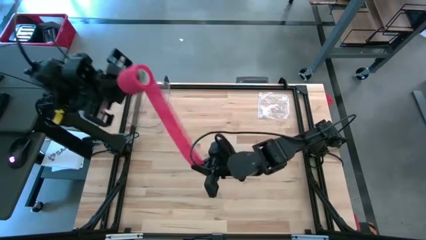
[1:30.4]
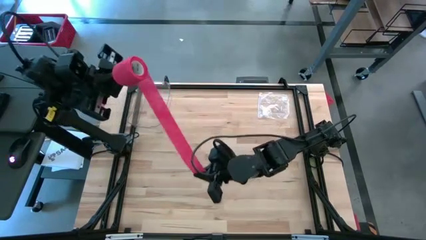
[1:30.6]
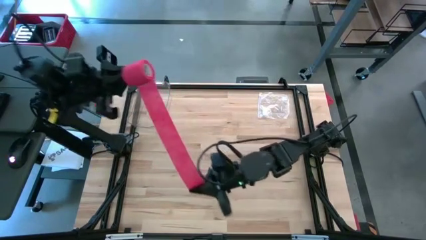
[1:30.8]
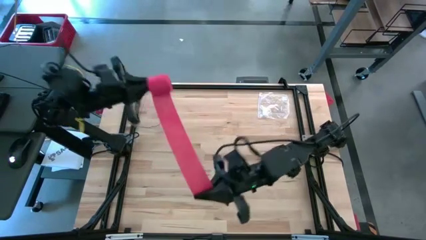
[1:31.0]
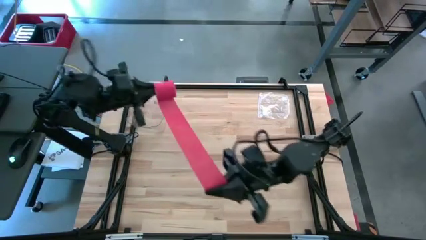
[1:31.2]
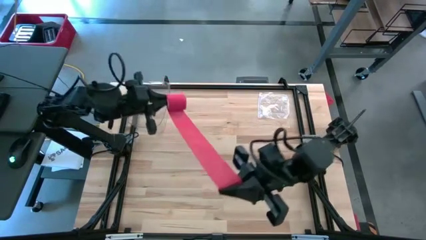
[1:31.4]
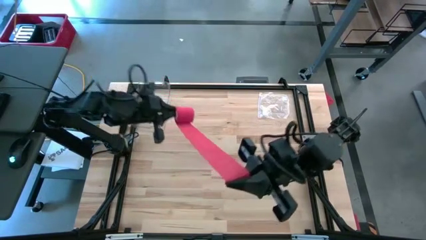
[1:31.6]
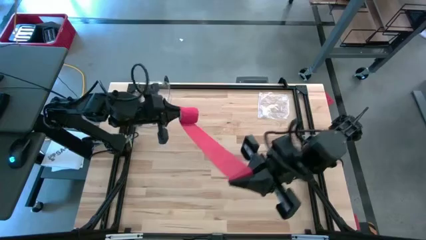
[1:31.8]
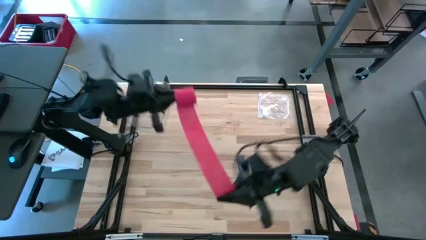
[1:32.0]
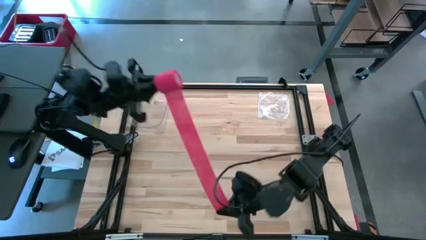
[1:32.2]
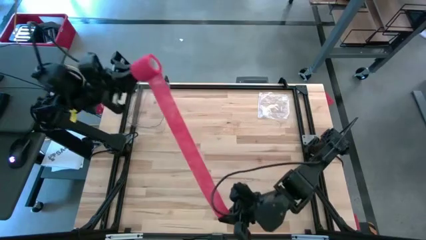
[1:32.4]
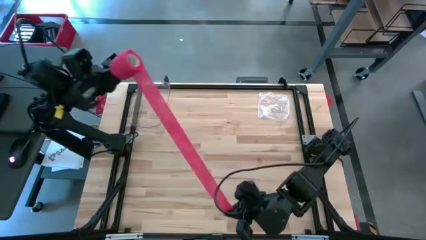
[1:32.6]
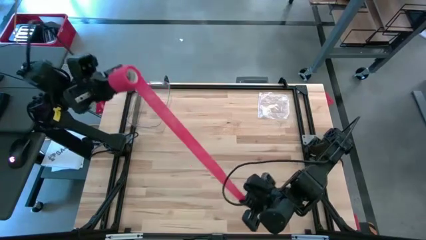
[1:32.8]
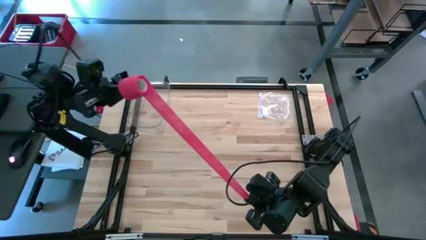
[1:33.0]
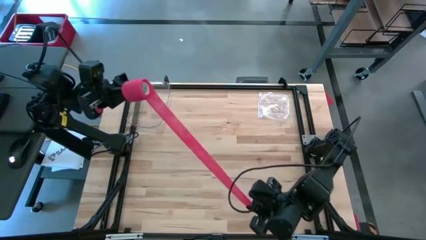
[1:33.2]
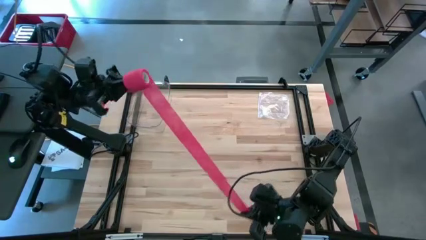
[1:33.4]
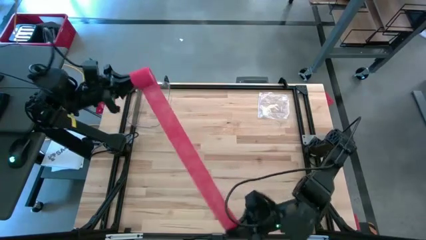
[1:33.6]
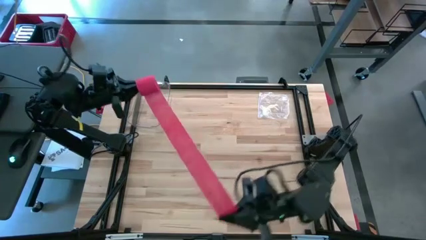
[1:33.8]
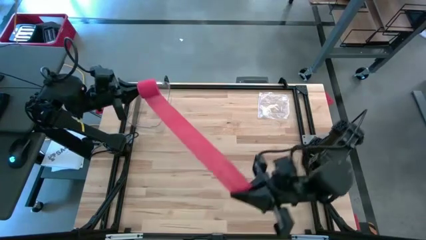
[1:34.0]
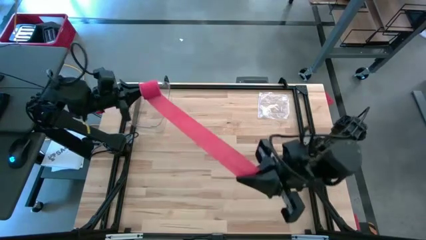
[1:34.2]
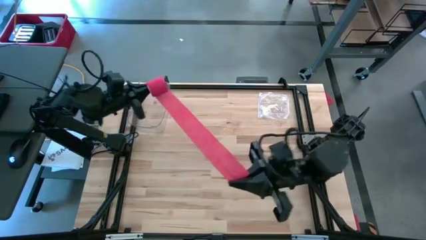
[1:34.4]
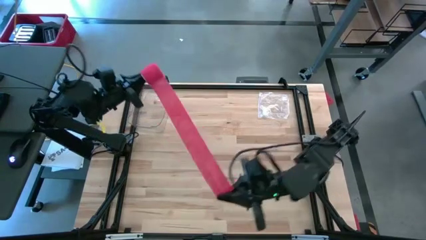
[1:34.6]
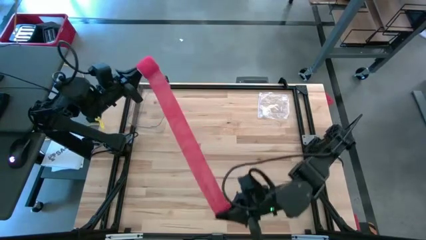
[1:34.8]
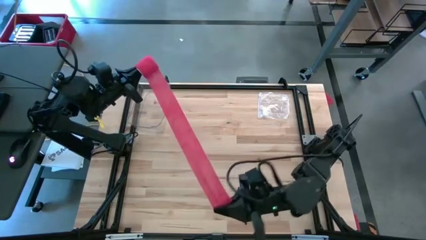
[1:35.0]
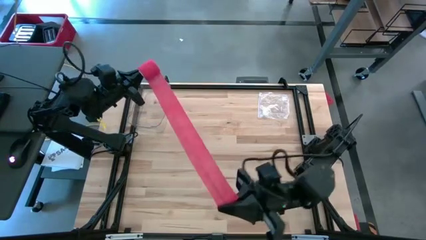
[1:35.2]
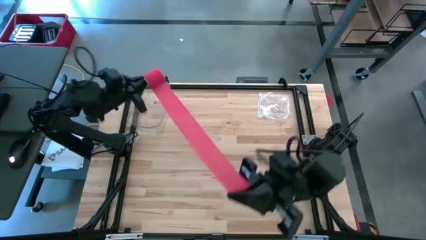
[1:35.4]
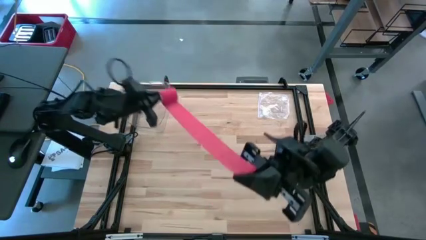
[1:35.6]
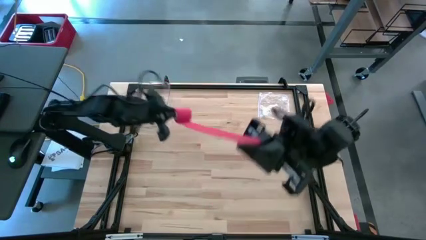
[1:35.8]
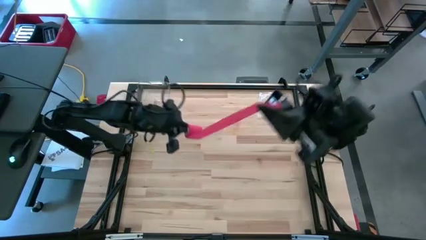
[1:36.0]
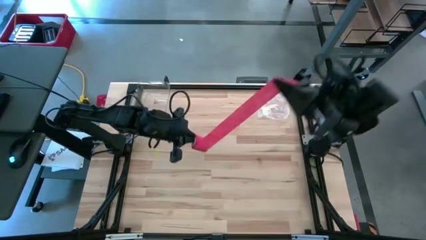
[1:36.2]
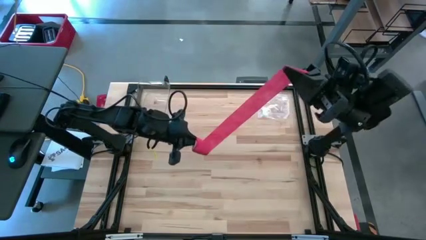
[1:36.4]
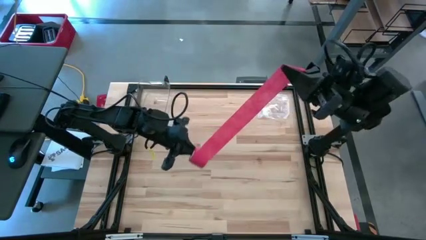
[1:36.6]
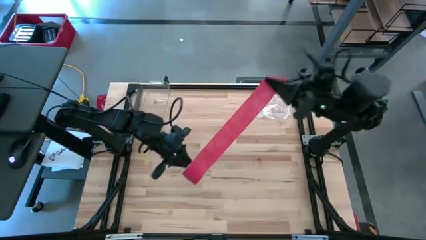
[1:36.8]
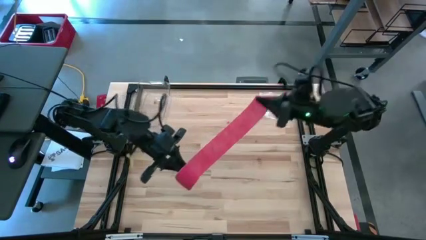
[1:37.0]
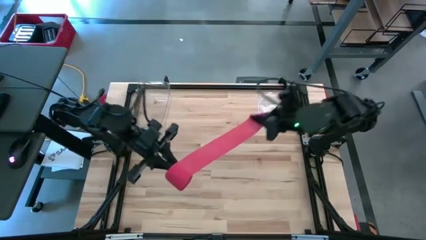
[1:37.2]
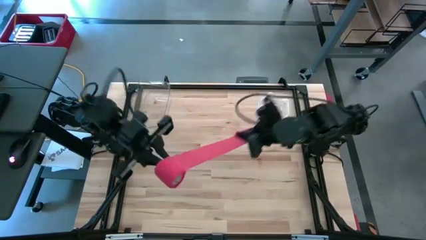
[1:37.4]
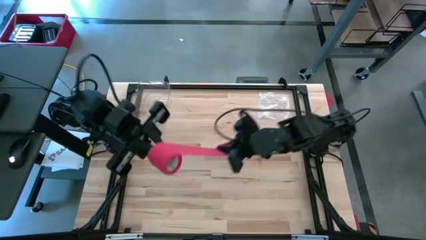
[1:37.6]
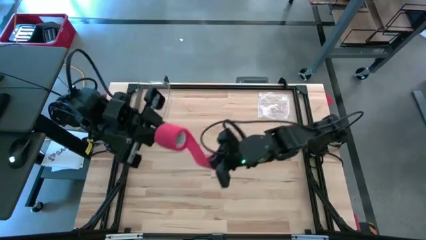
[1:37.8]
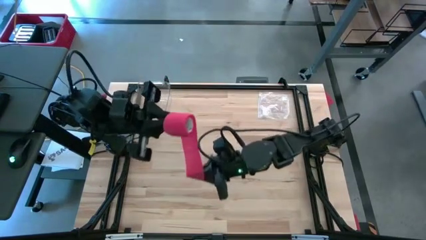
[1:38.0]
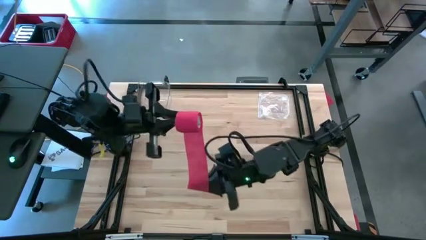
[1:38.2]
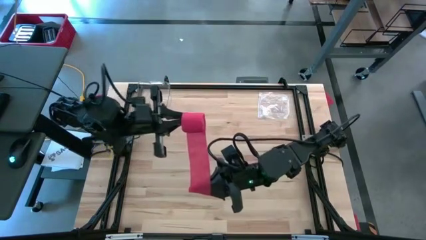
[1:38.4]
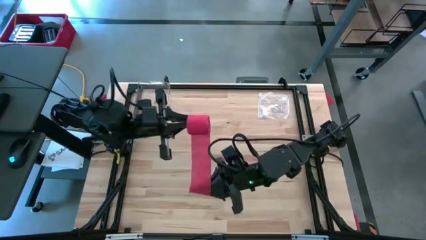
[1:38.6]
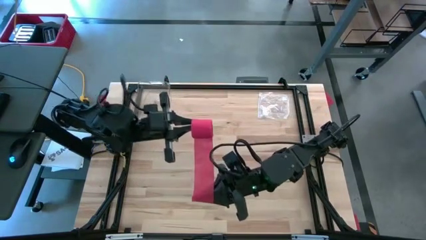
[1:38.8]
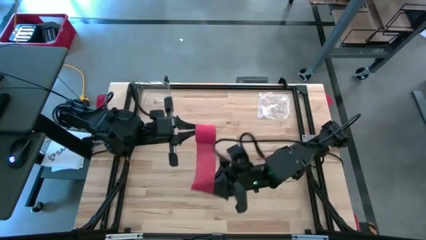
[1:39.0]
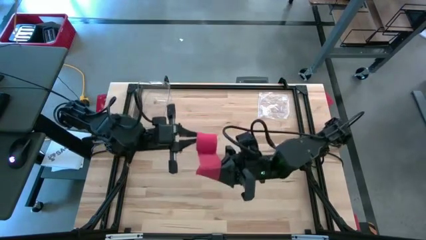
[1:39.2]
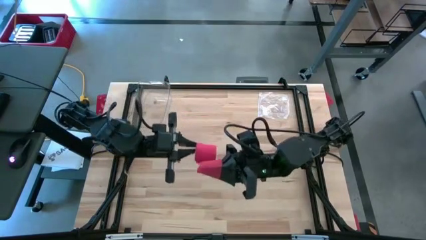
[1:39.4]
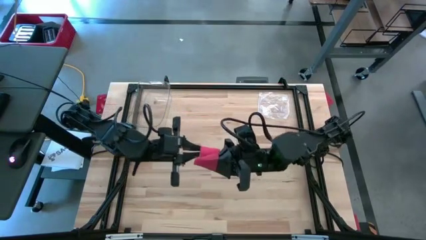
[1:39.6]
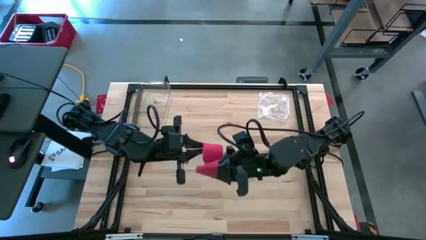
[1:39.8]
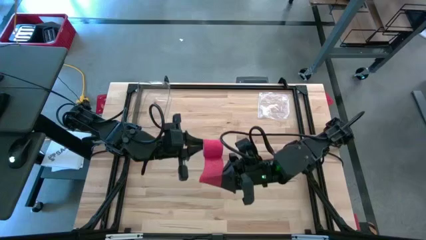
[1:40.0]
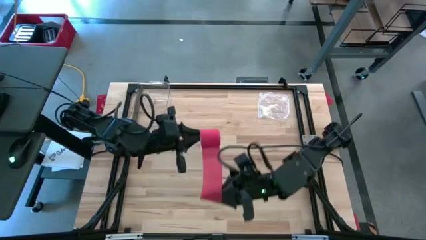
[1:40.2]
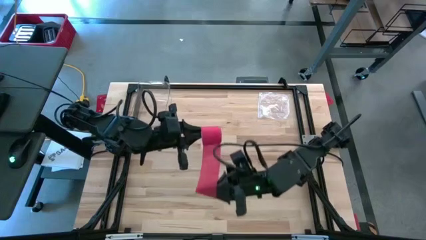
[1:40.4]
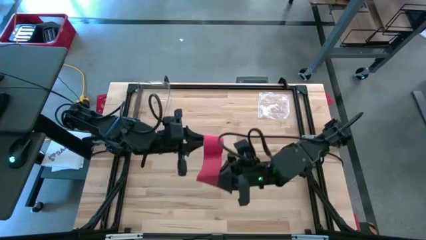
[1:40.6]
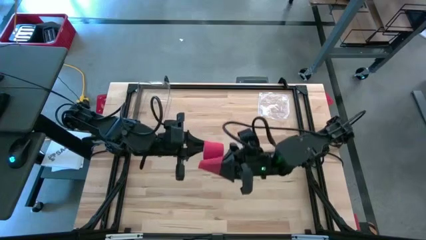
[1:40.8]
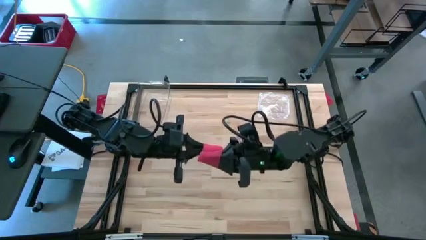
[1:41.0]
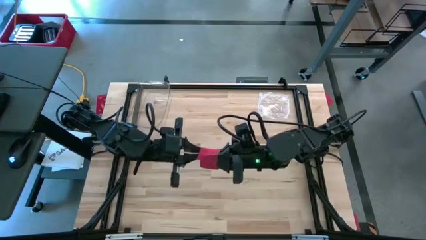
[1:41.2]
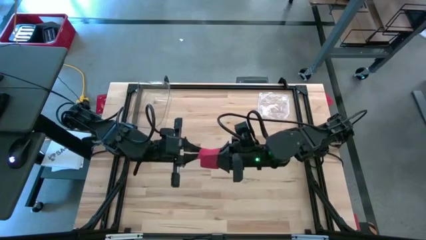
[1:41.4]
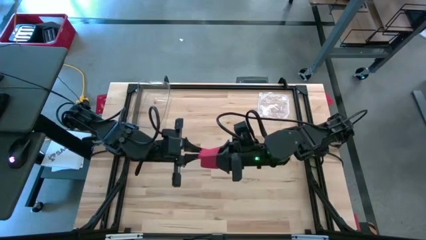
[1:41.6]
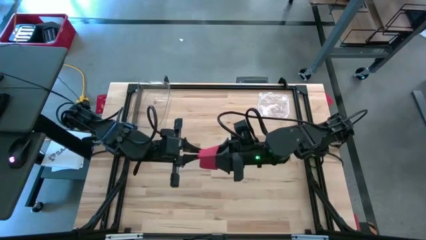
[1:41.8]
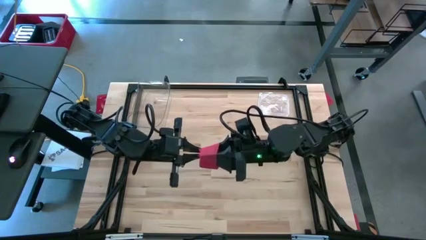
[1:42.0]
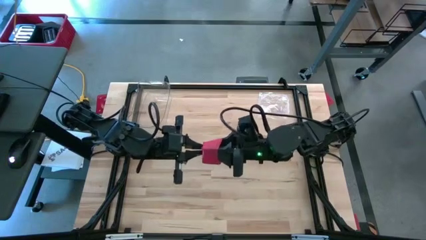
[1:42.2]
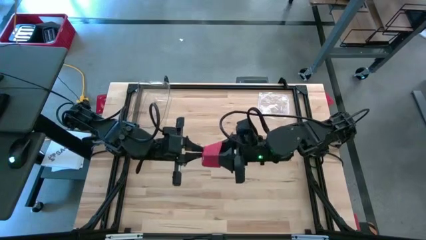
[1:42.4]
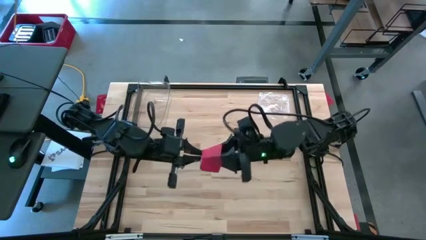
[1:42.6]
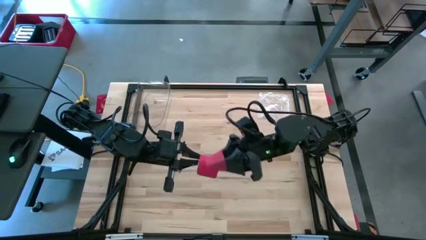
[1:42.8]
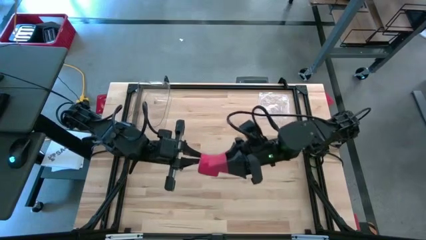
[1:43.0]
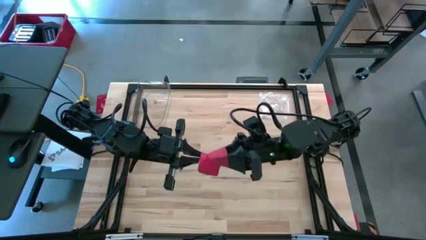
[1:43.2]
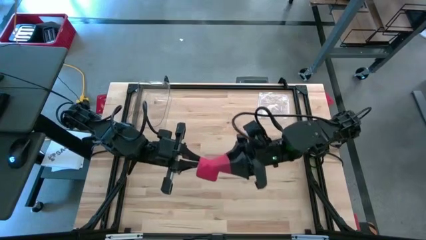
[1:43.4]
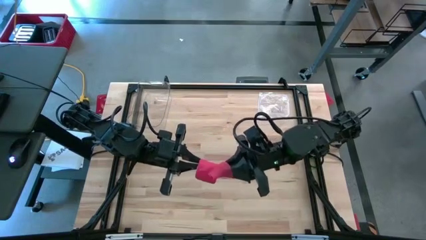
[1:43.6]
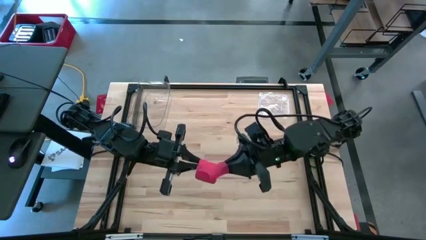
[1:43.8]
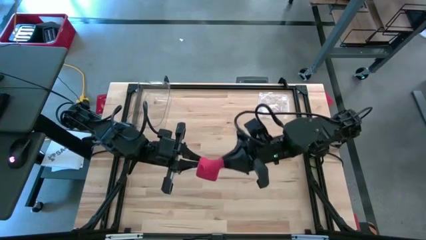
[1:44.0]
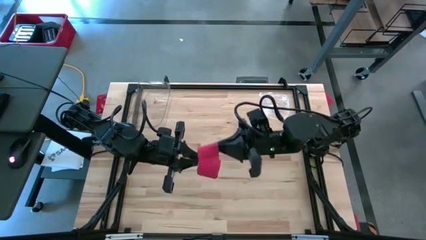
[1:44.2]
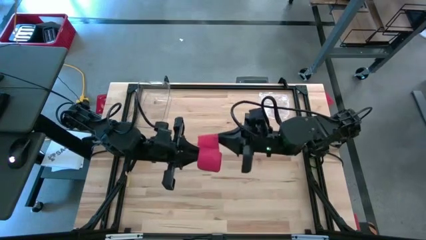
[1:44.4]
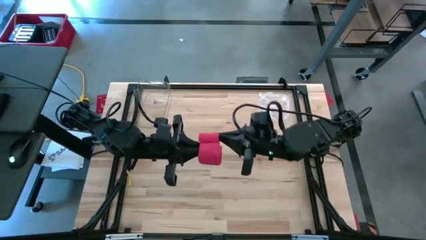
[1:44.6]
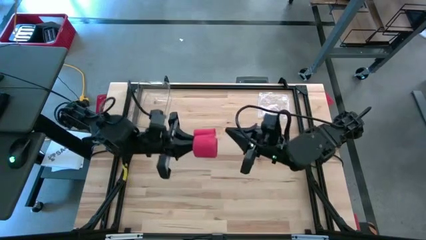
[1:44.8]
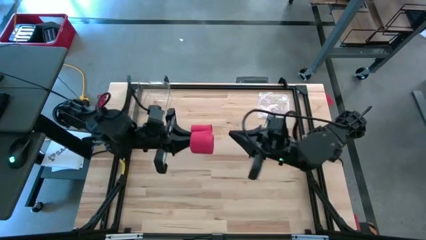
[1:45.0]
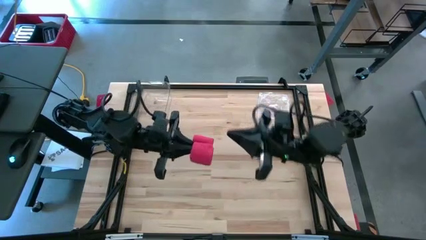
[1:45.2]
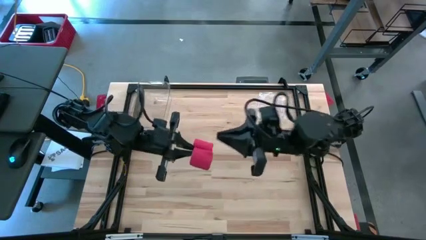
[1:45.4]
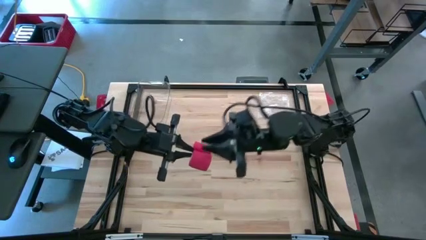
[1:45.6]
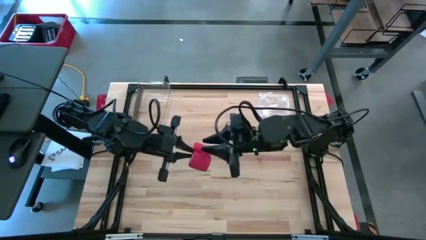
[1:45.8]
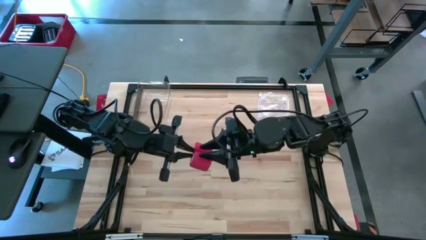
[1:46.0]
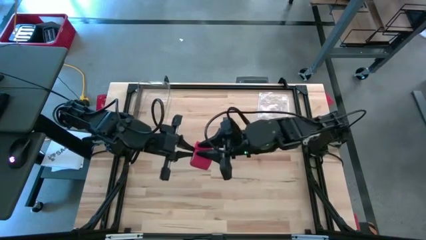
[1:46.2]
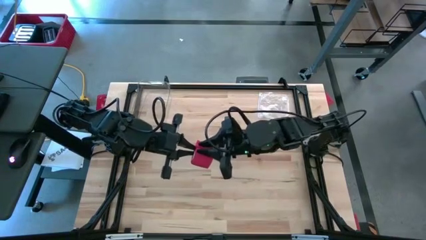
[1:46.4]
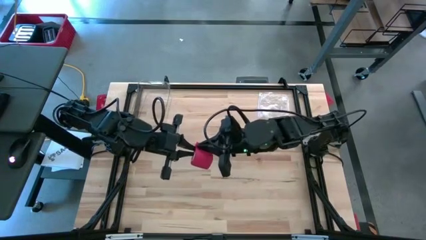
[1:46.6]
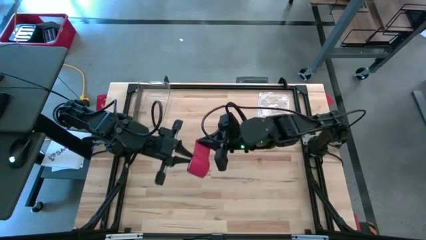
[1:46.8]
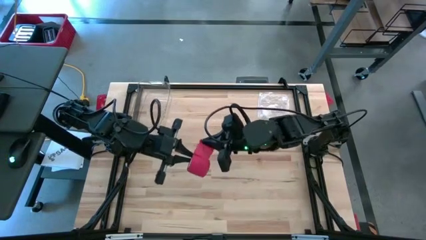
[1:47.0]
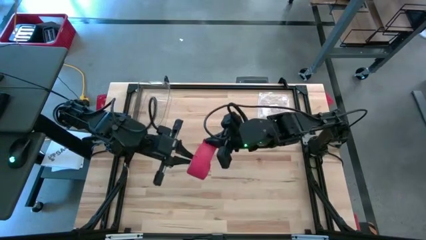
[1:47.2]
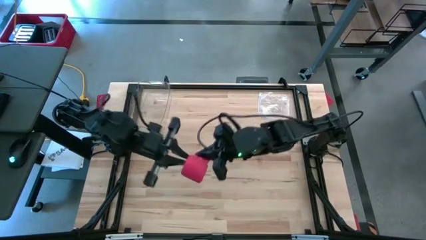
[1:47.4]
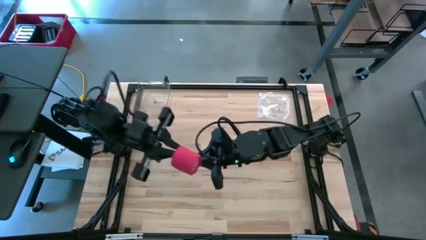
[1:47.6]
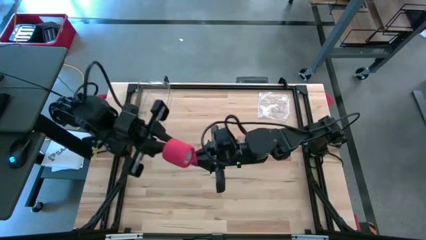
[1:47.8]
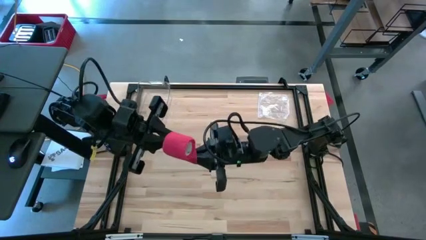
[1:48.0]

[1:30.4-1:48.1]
Task: Roll bandage
Roll the red bandage
